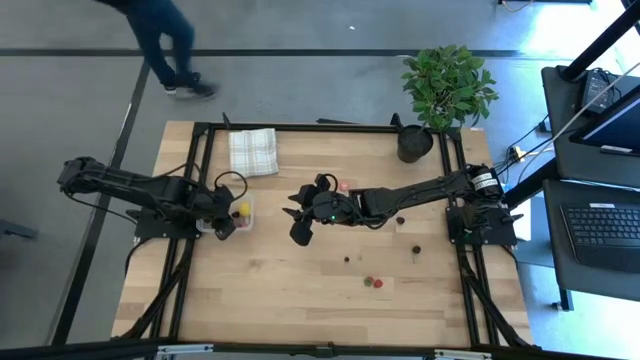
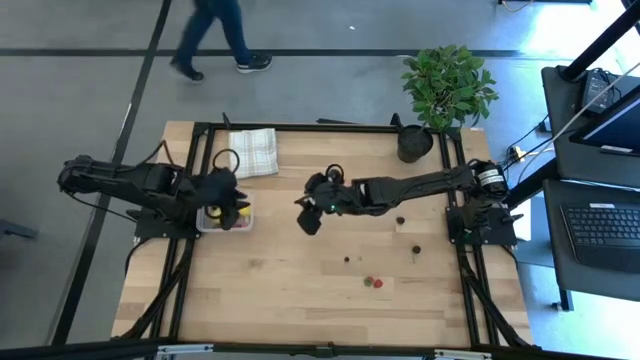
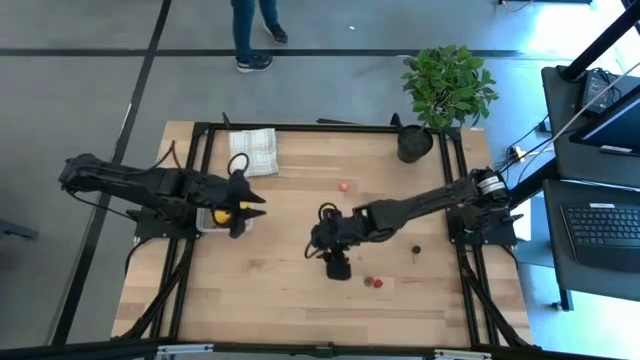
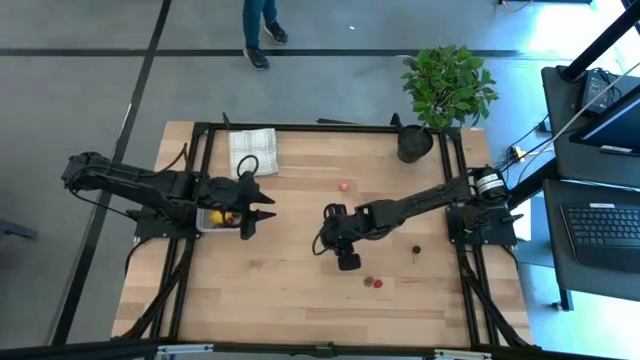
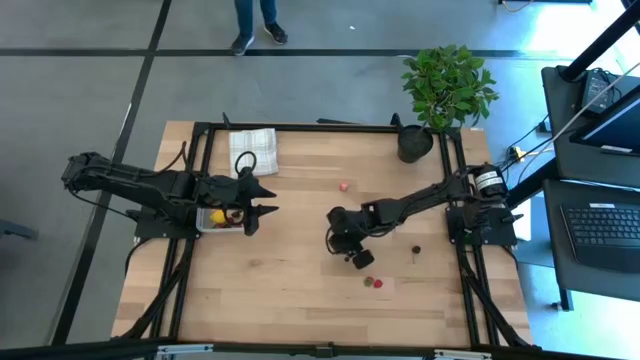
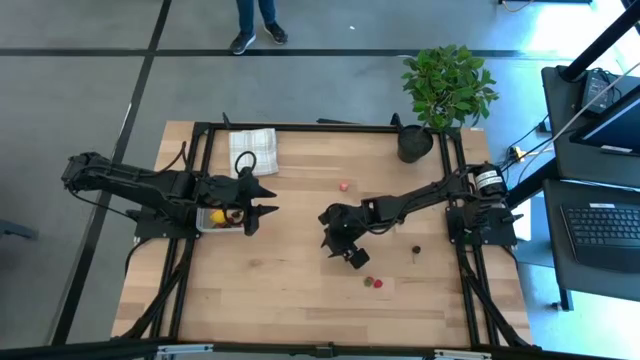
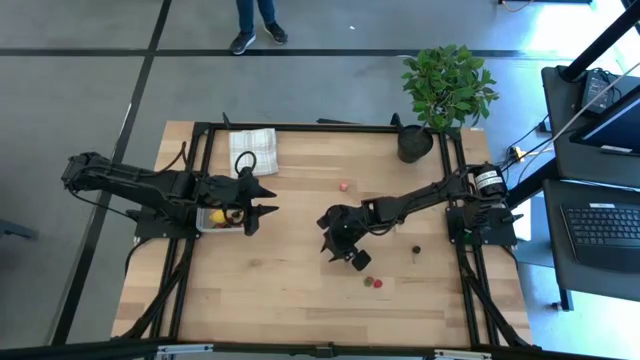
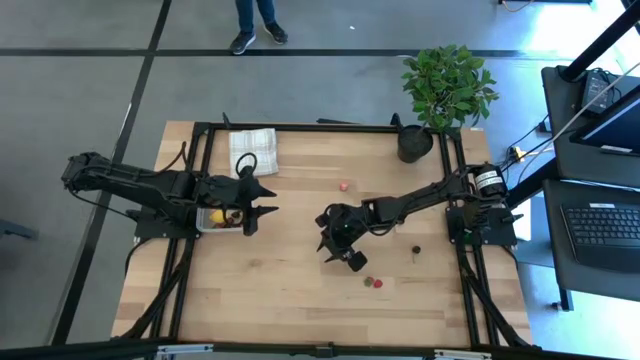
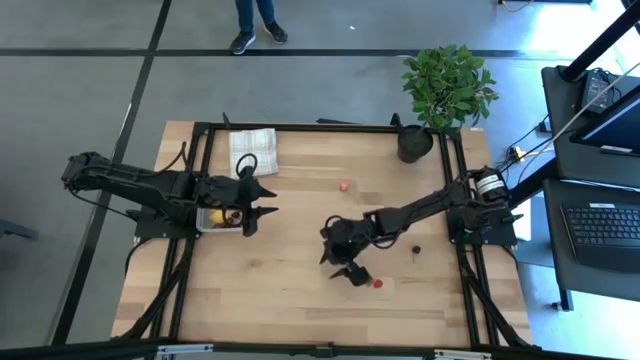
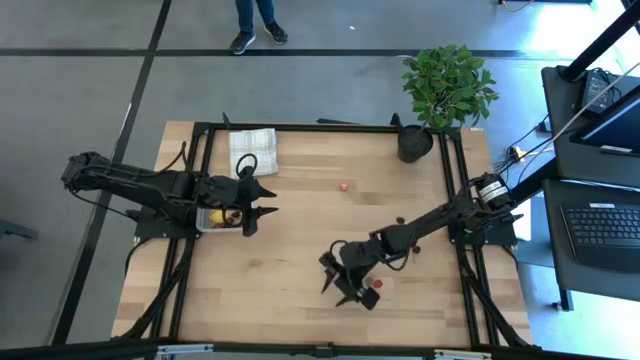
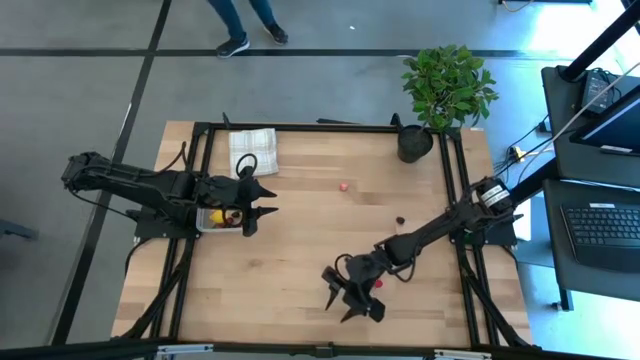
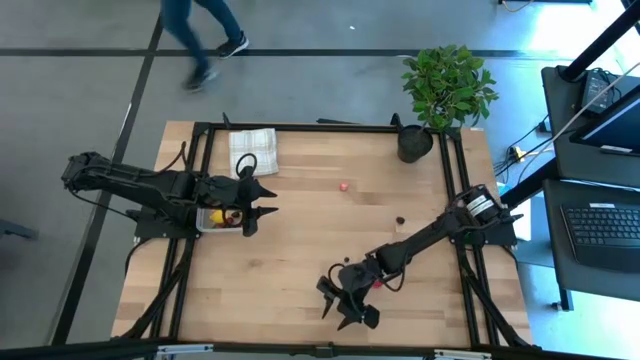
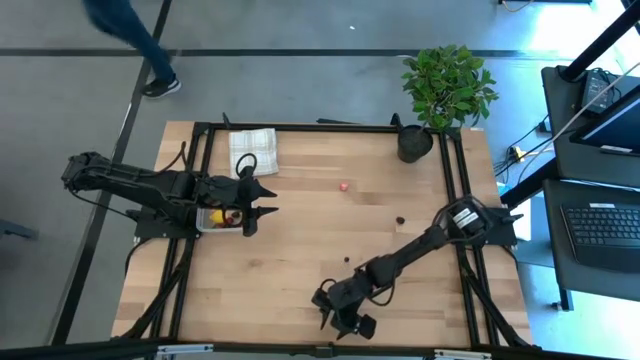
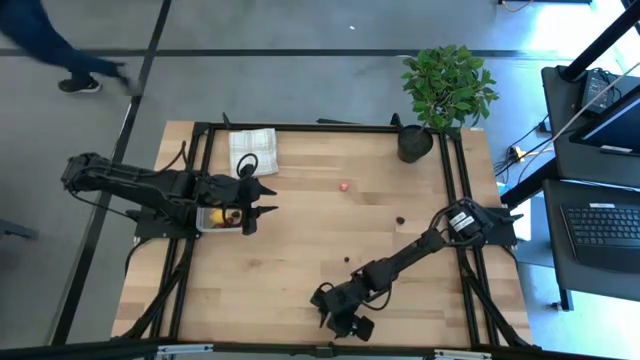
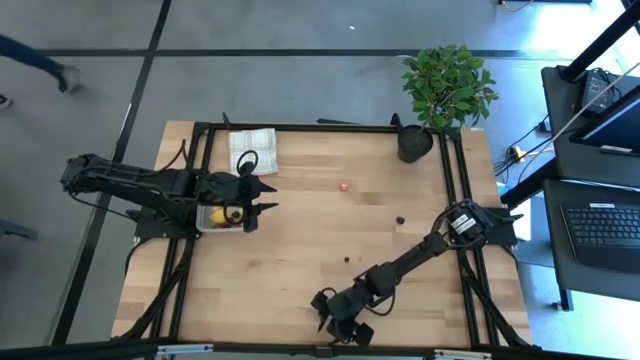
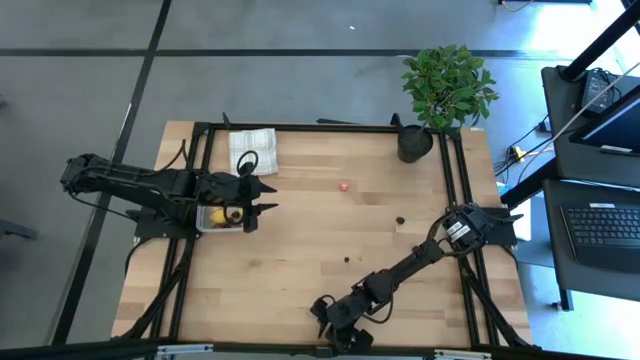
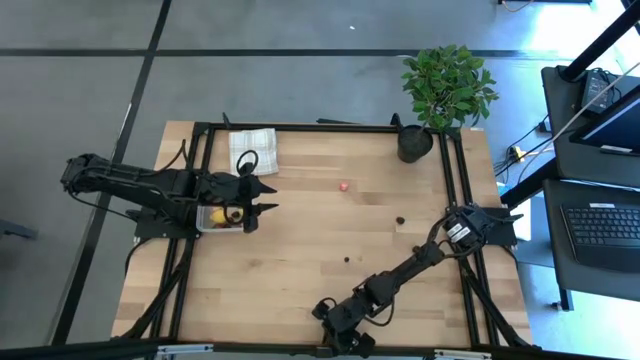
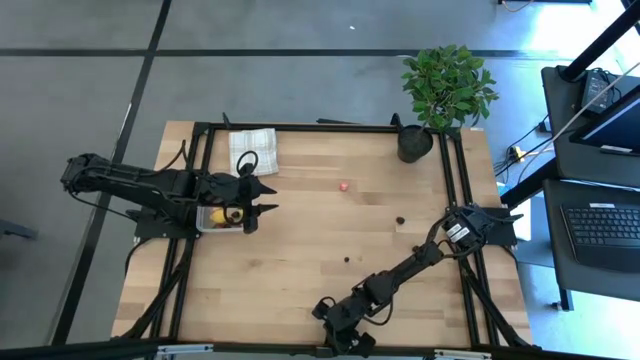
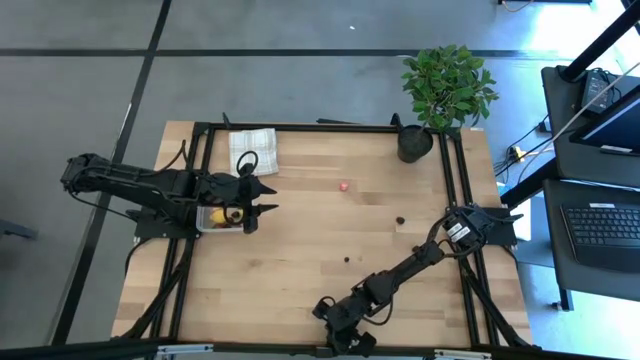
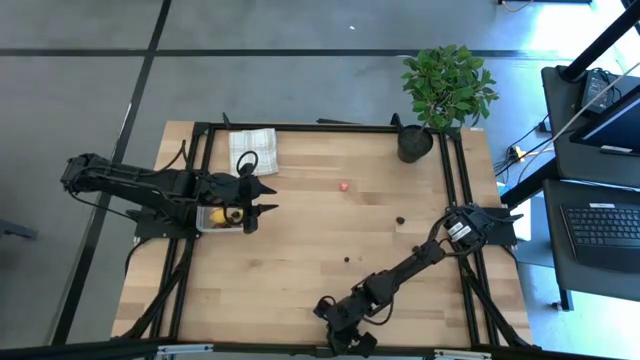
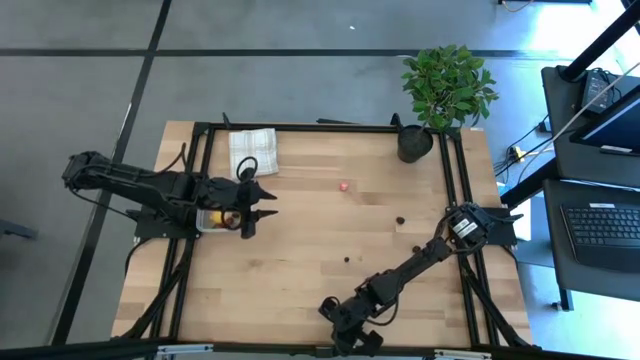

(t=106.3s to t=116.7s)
Task: Pick and placing Produce into tupperware
Put the bottom blue berry into the transparent bin

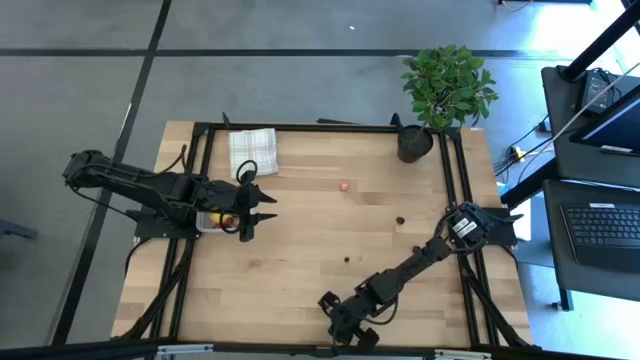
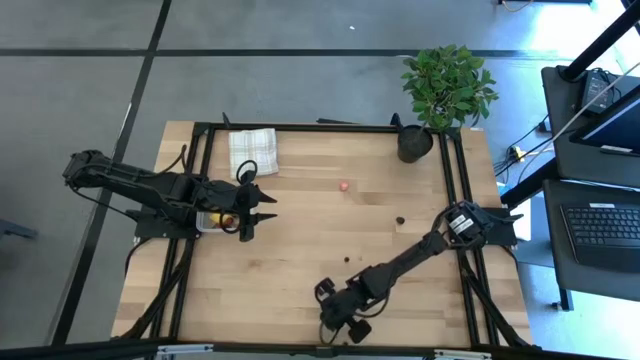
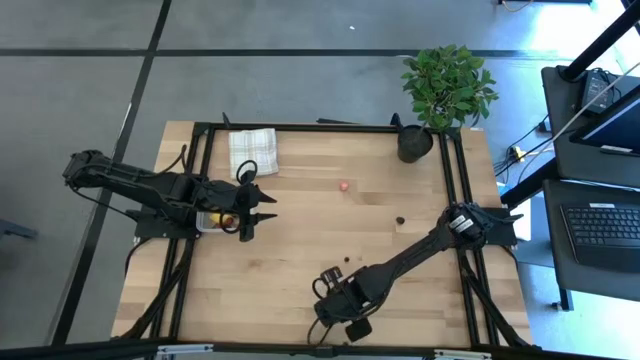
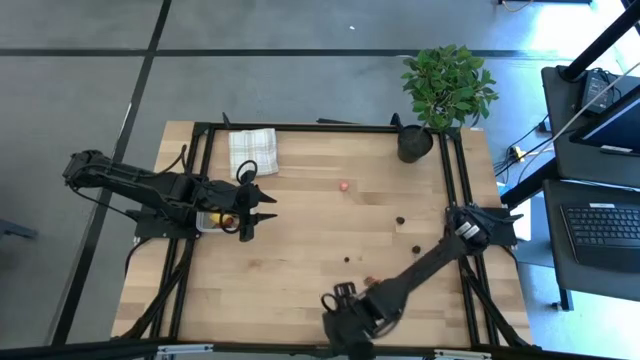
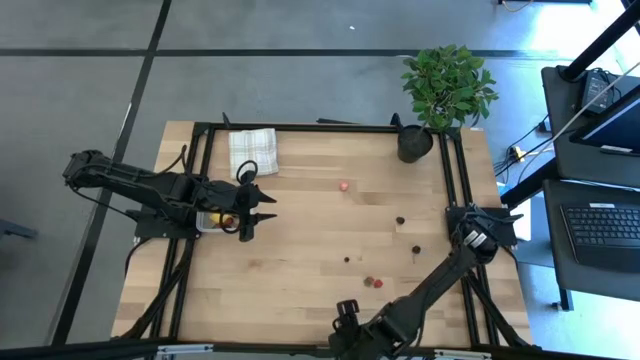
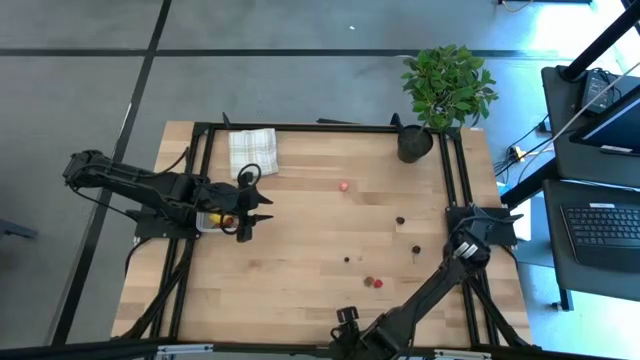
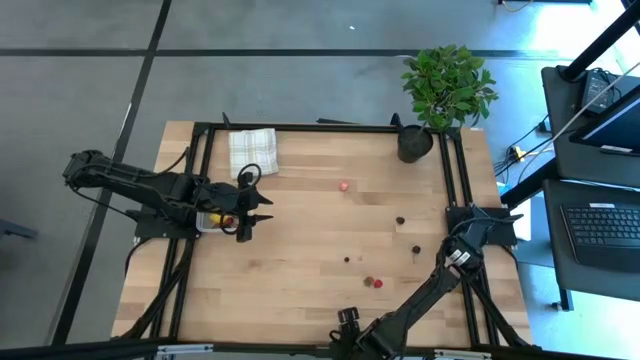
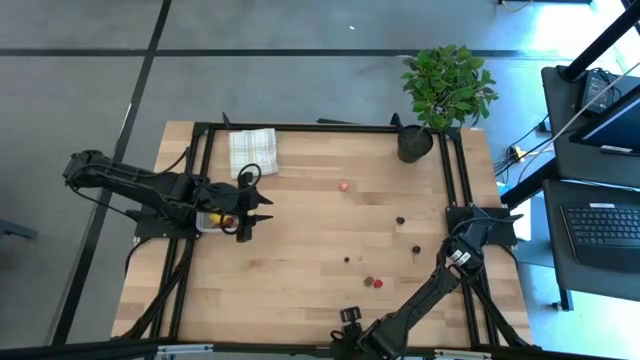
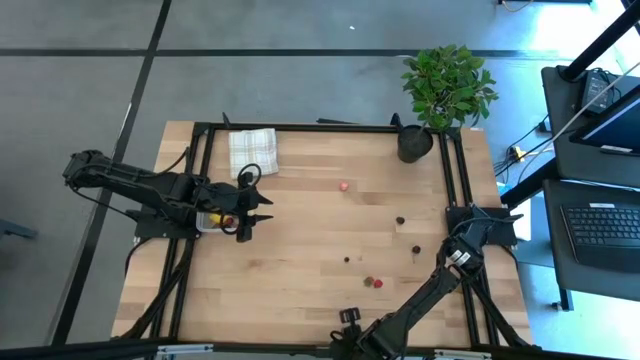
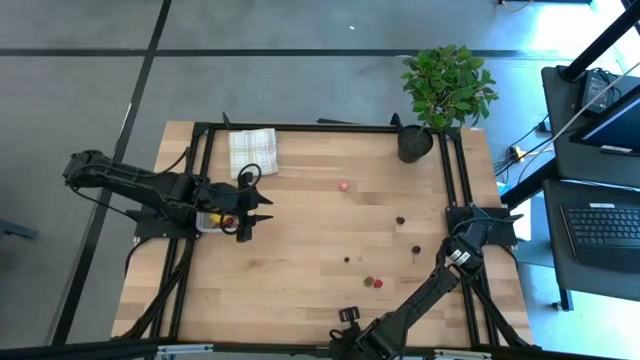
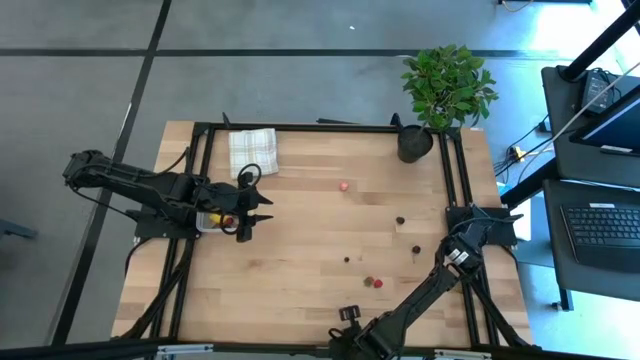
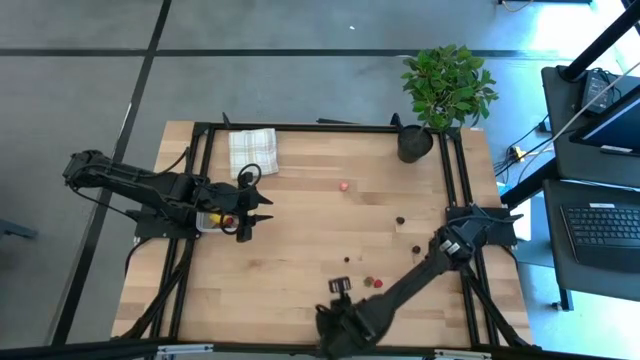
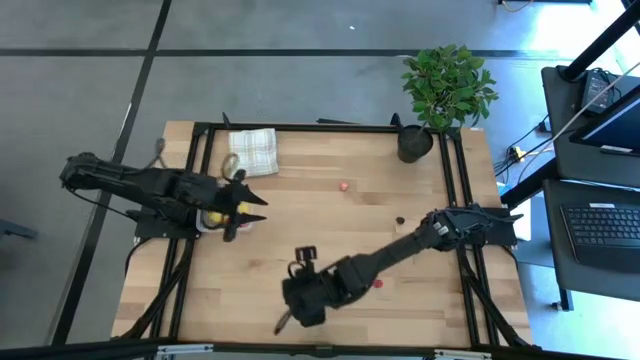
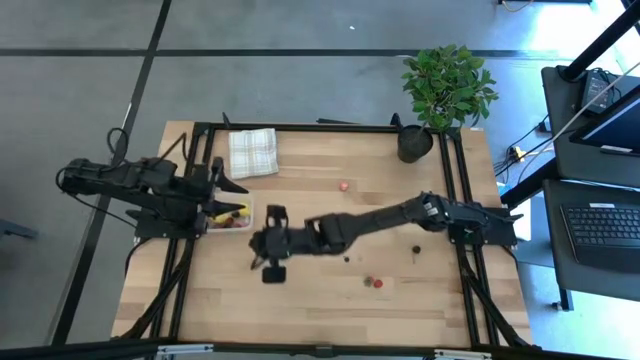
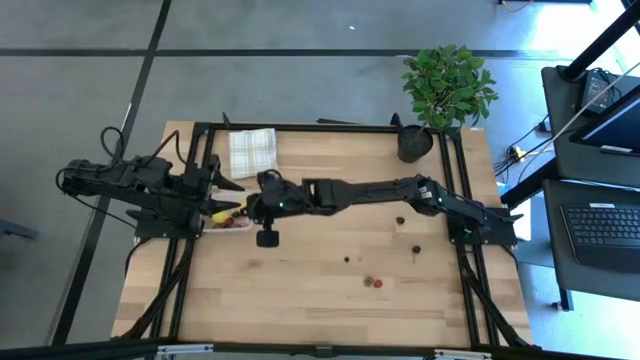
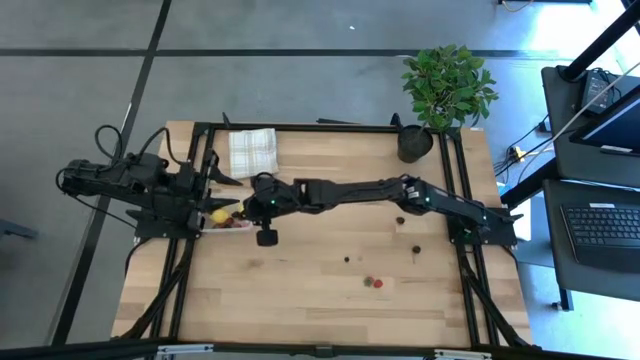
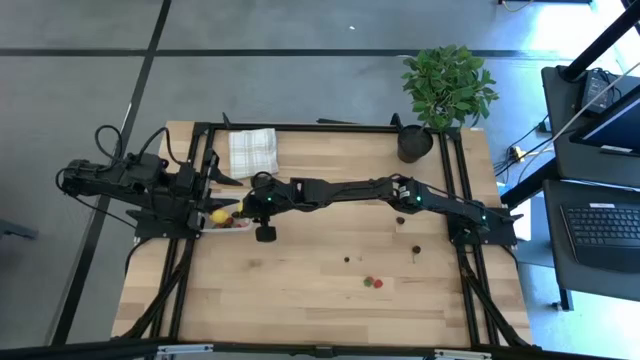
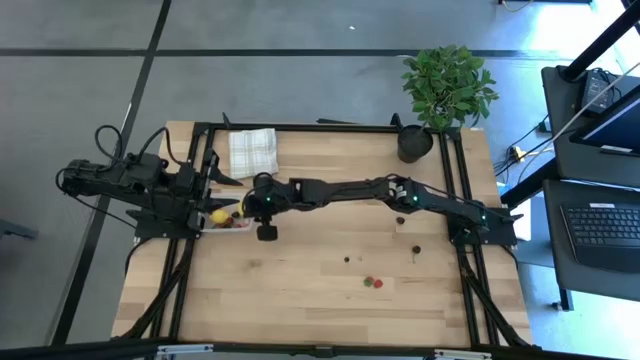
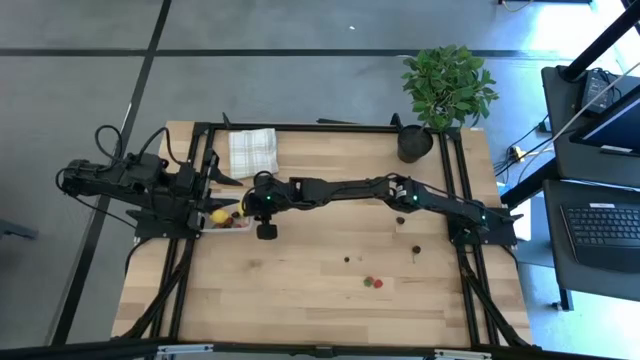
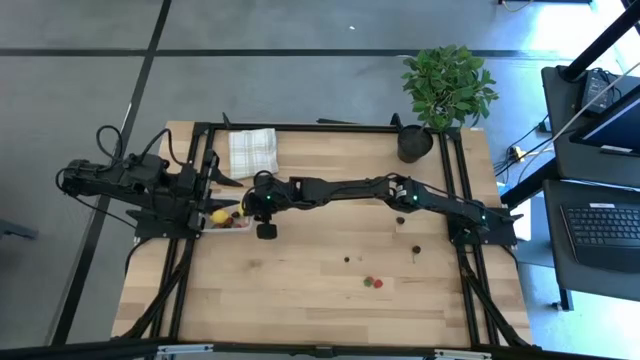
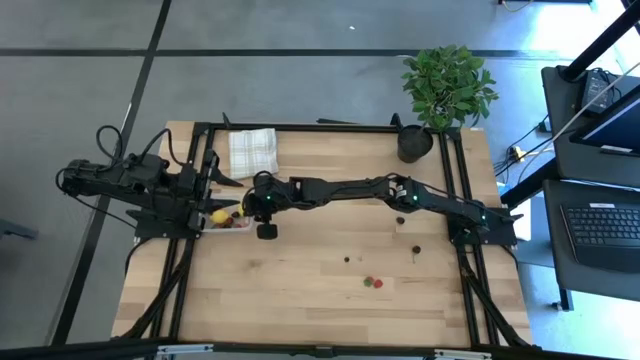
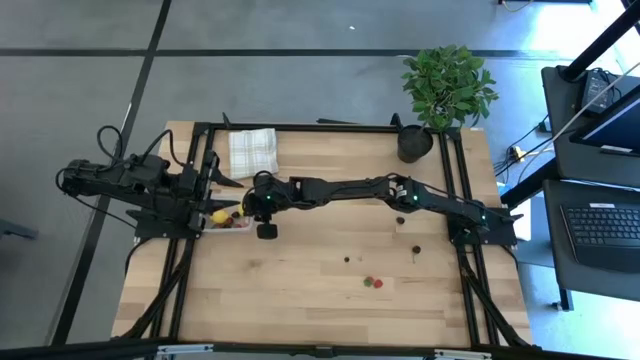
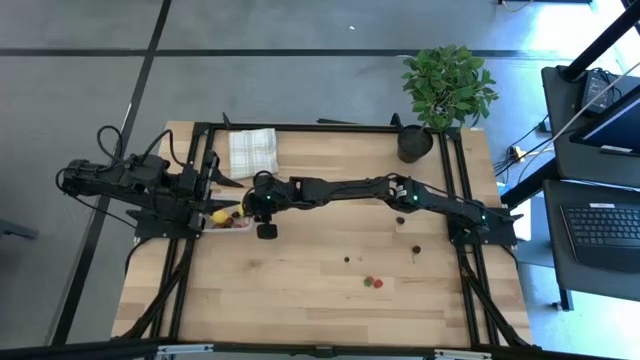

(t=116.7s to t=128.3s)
Put the bottom blue berry into the transparent bin
